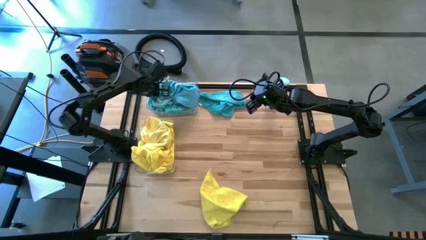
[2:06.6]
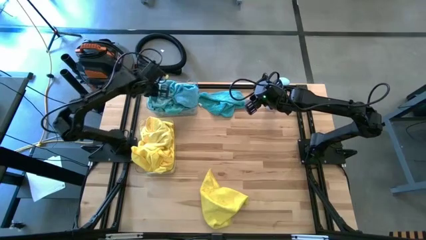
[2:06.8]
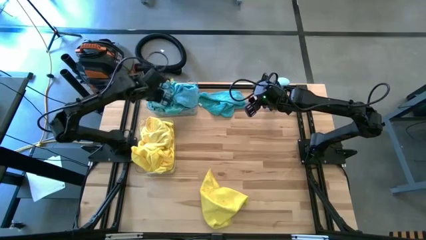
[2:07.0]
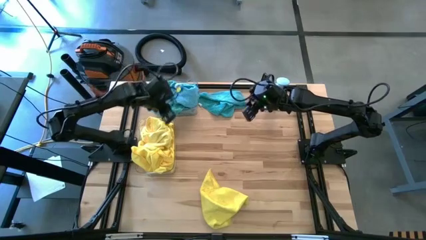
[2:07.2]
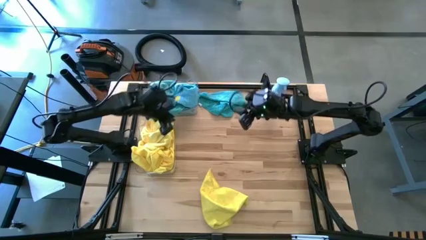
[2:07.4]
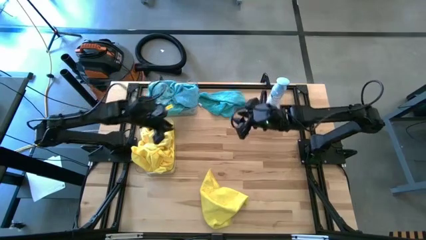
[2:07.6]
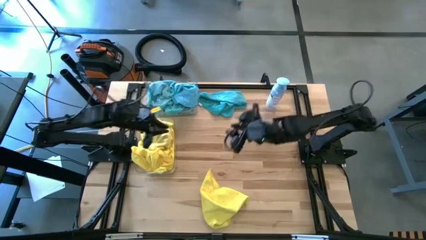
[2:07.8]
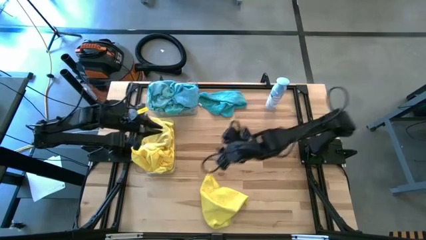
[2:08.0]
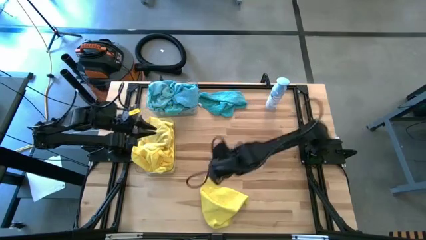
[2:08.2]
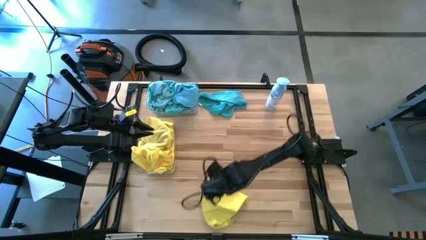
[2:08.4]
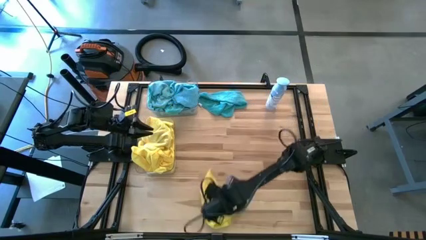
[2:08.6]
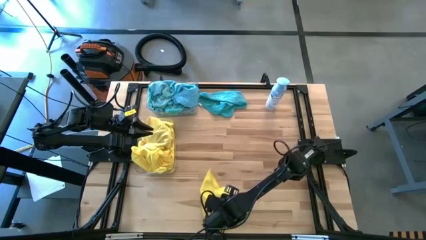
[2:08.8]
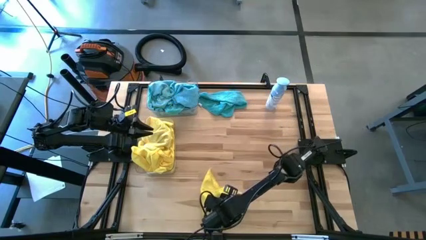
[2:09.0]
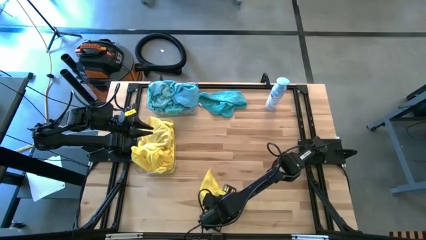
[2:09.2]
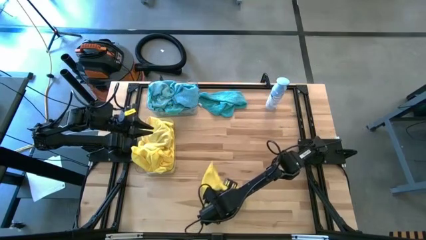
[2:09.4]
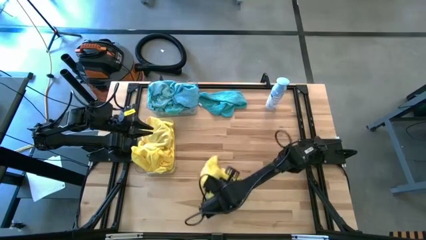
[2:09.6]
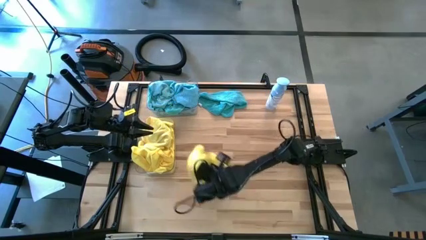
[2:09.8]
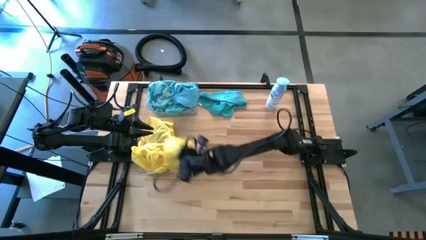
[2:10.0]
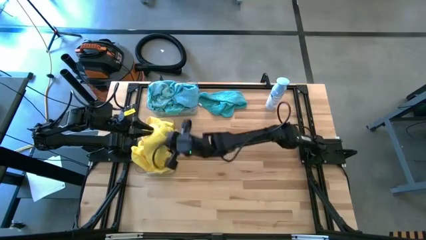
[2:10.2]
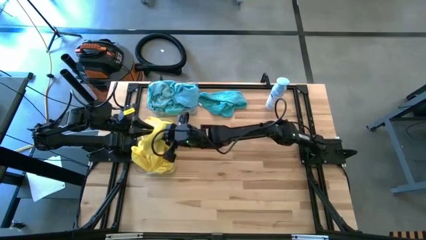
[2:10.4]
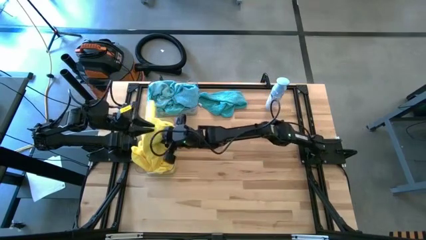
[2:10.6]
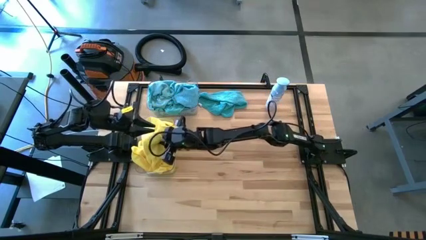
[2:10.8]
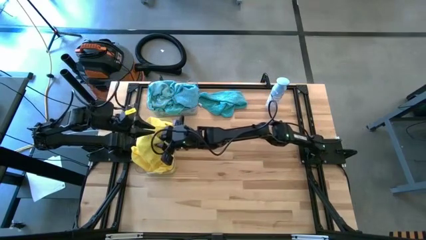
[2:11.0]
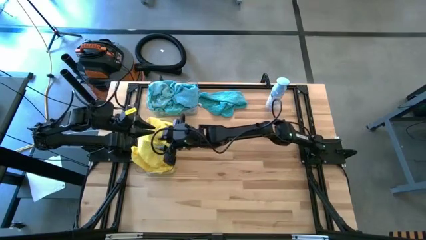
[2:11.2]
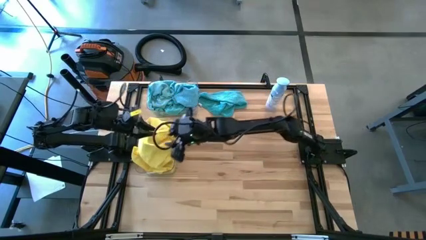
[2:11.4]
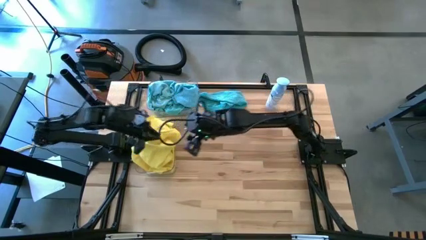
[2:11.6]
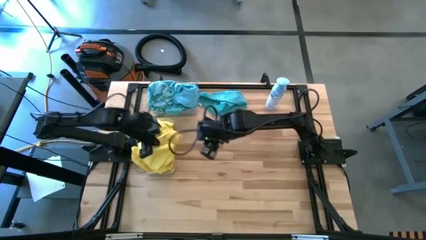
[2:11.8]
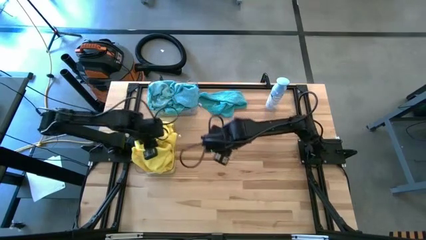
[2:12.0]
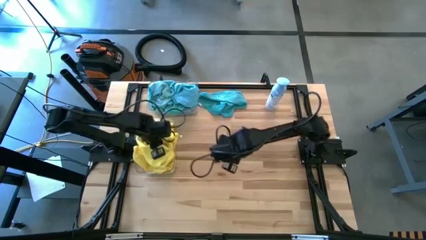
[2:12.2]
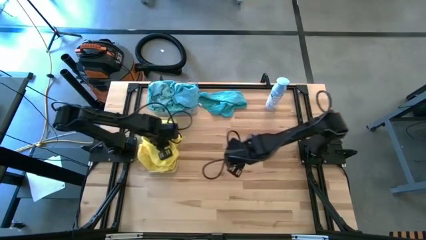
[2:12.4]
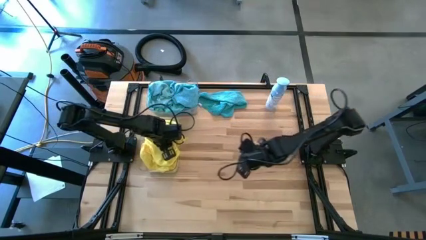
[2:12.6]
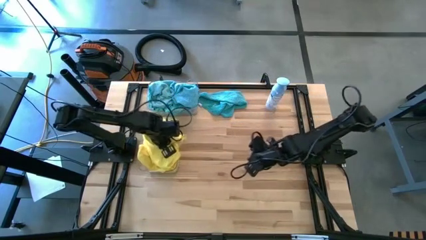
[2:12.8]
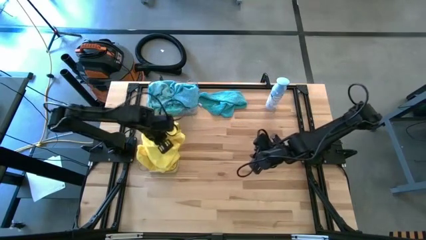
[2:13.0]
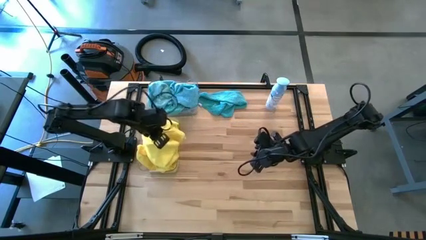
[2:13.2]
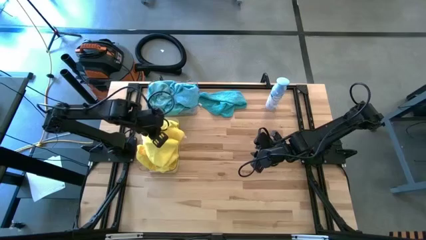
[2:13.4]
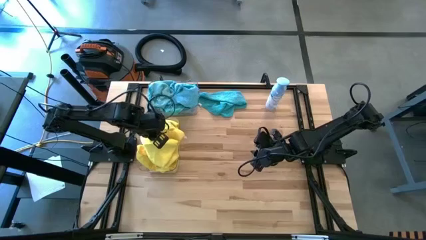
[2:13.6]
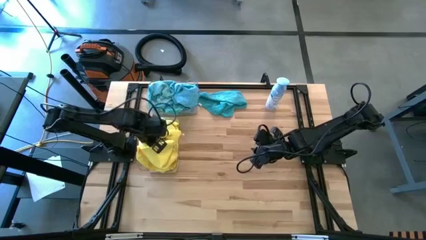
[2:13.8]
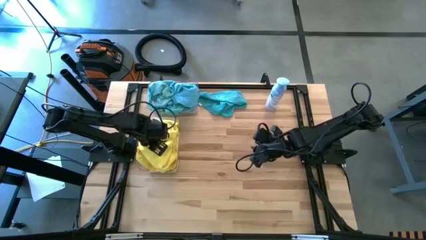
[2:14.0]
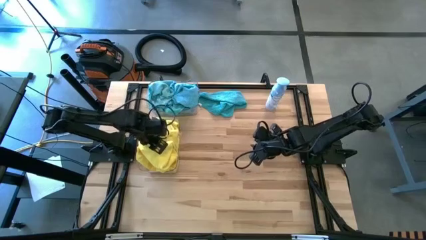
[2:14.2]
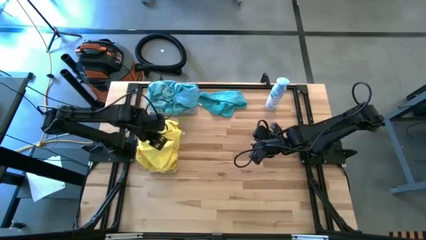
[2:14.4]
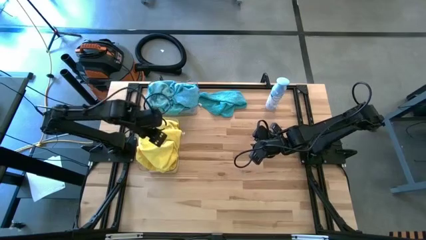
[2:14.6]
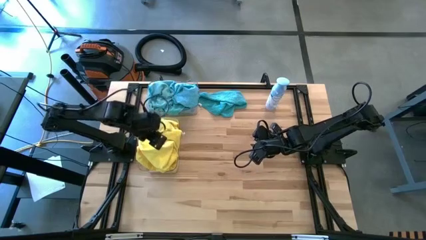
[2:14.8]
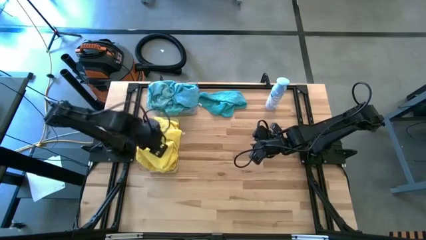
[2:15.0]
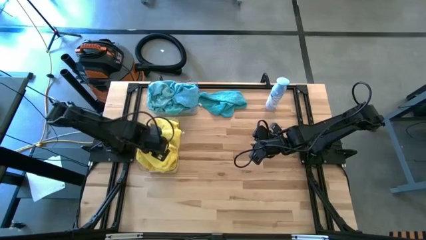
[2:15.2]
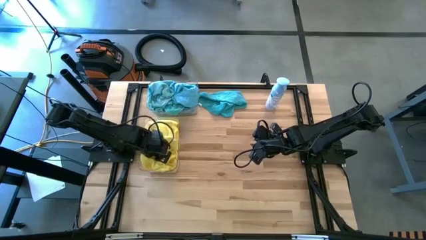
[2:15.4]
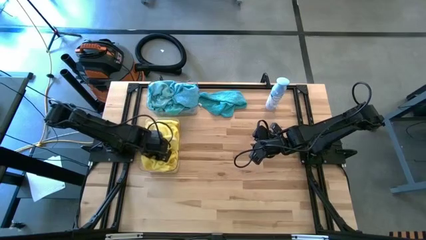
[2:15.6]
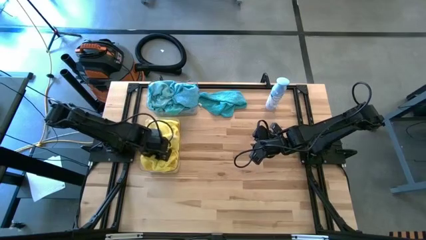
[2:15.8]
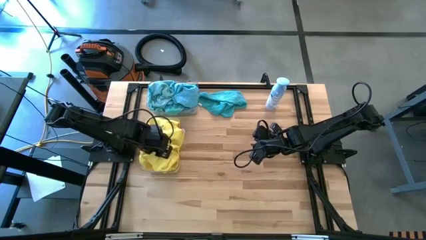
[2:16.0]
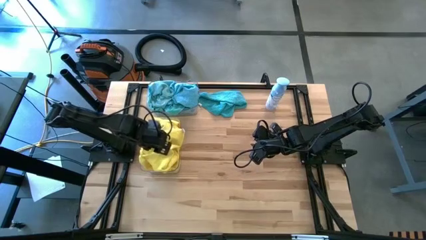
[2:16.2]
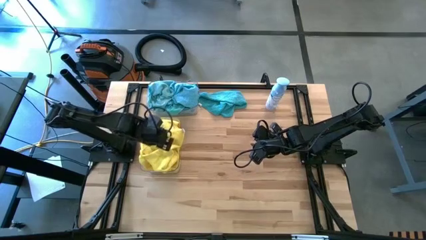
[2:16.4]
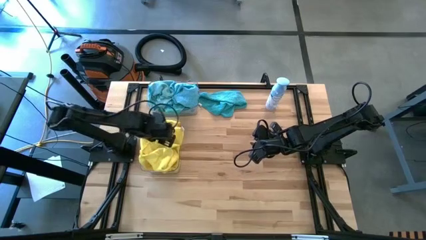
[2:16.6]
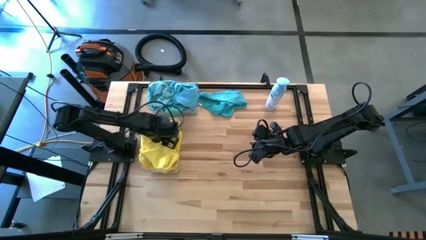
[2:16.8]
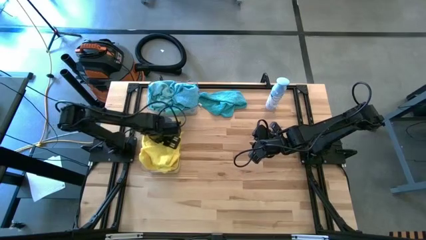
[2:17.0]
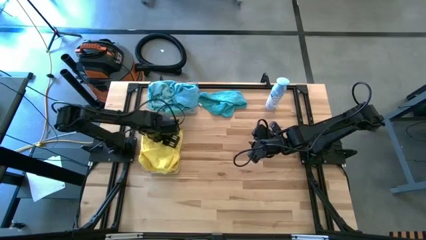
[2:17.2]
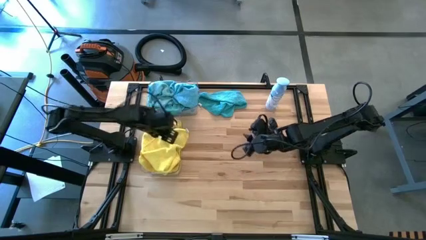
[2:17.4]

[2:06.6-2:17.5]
Task: Sort microfiber towel by color & place in baskets
Put the yellow towel into the bottom transparent bin

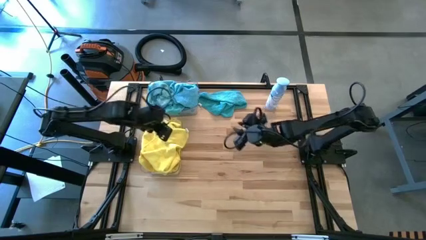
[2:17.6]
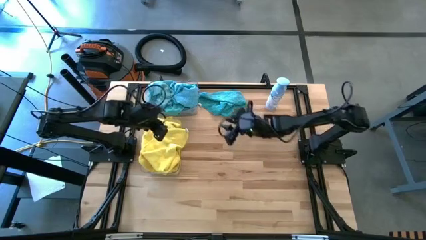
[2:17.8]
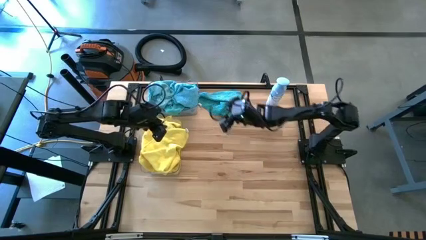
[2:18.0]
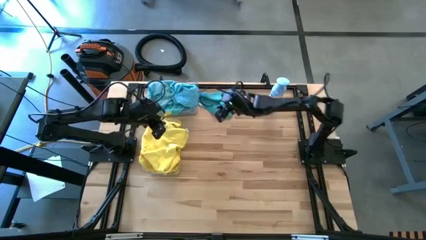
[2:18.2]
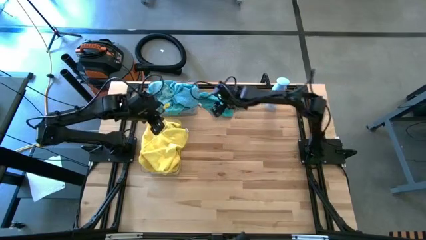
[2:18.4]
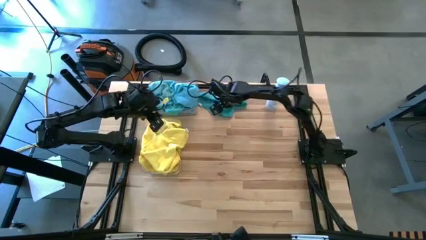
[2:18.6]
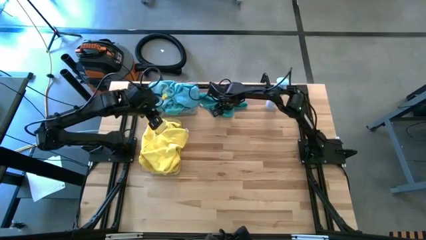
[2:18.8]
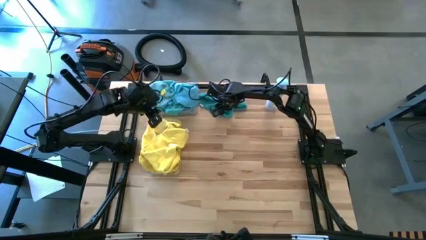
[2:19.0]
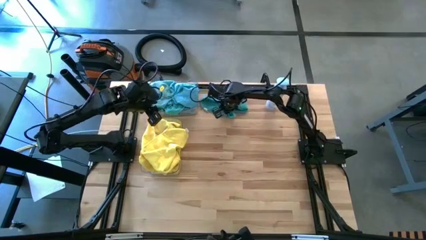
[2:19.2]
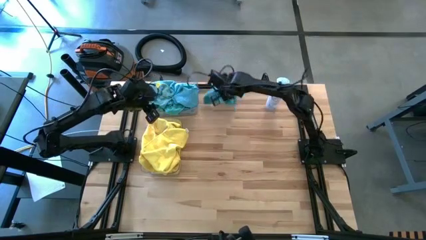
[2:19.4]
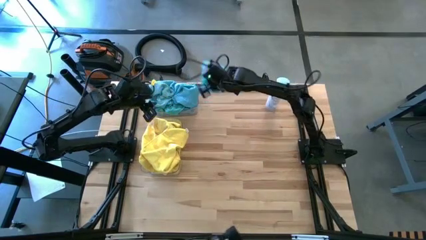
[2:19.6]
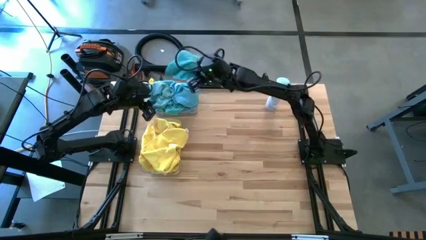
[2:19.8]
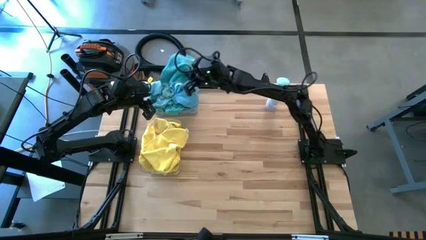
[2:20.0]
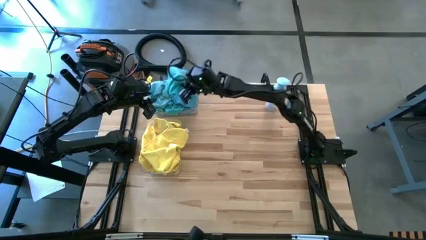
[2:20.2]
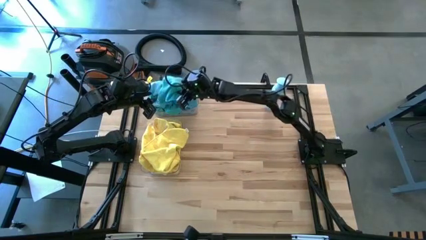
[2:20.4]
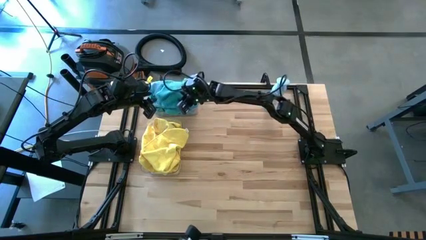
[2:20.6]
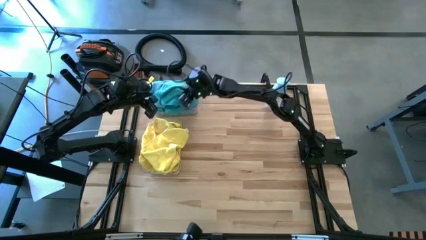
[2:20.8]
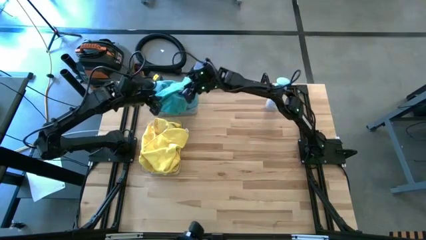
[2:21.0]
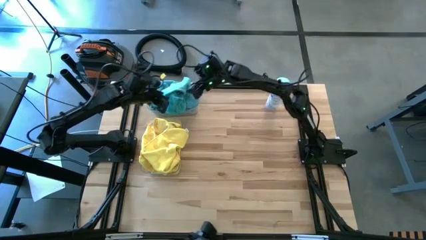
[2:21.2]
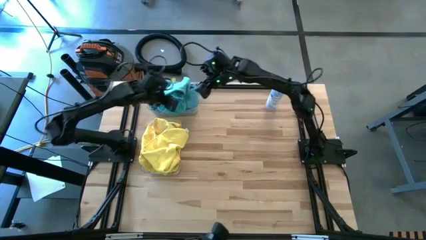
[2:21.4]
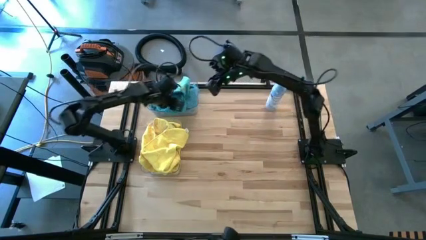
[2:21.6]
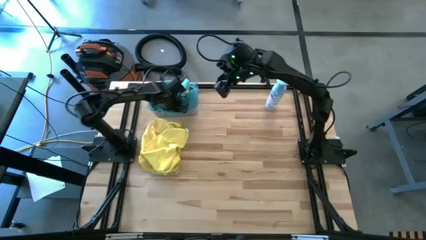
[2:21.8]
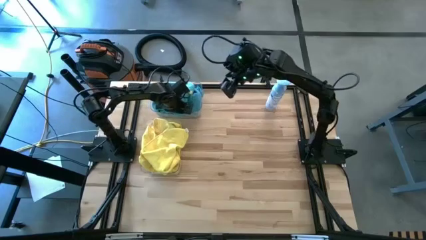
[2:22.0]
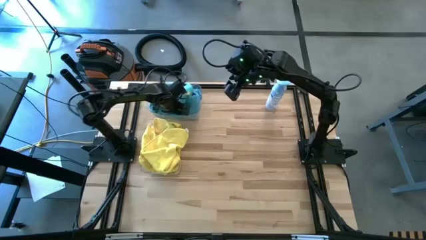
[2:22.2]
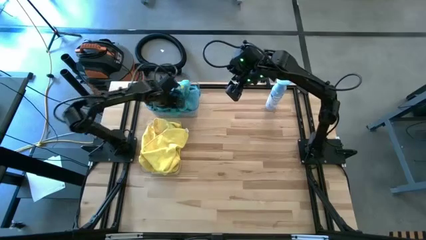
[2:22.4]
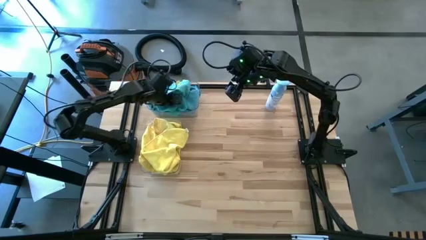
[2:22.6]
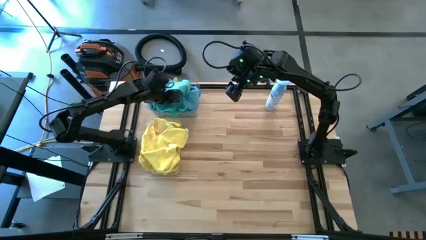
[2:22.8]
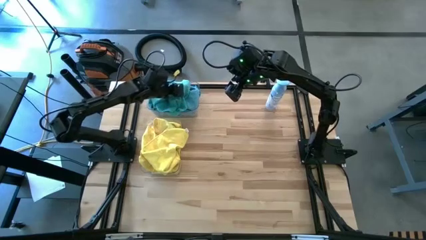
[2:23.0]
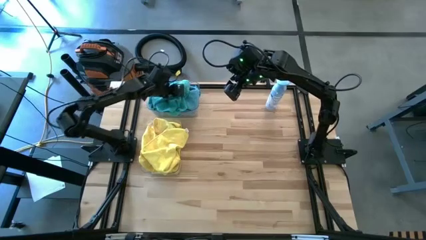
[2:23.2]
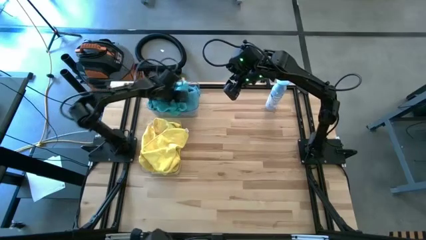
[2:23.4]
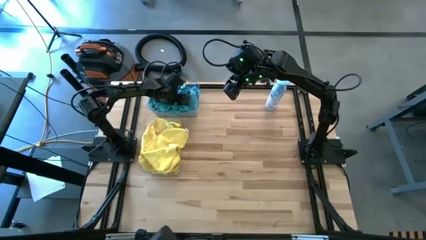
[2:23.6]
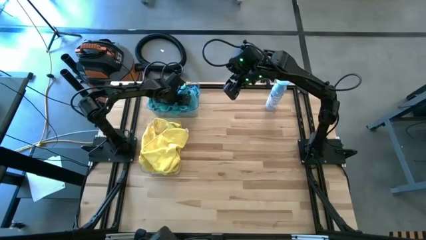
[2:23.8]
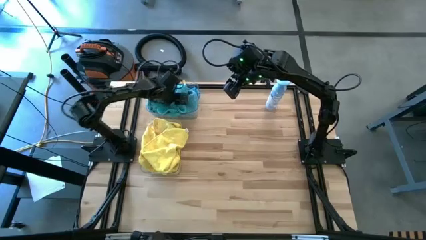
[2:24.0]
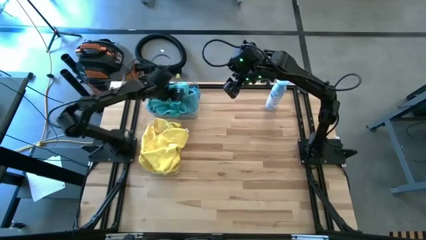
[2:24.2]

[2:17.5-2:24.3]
Put the blue towel into the top transparent bin
